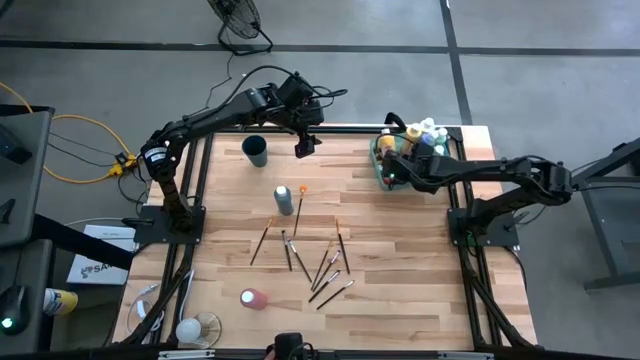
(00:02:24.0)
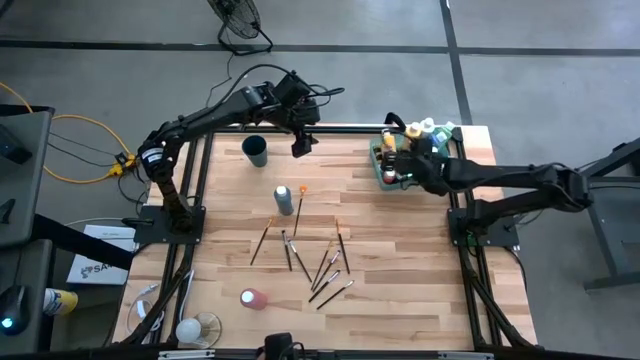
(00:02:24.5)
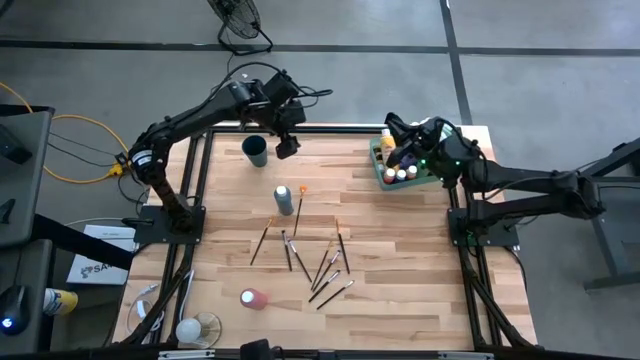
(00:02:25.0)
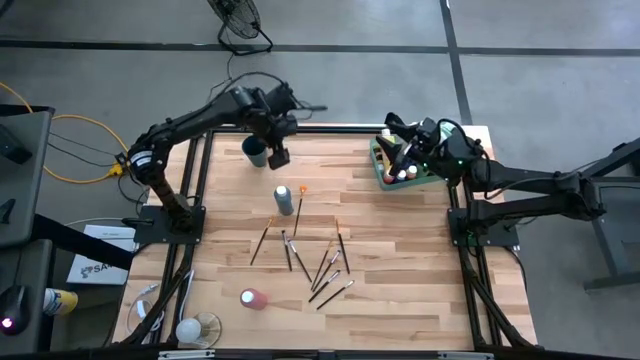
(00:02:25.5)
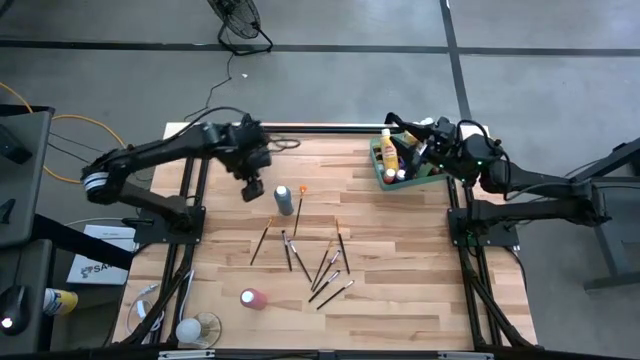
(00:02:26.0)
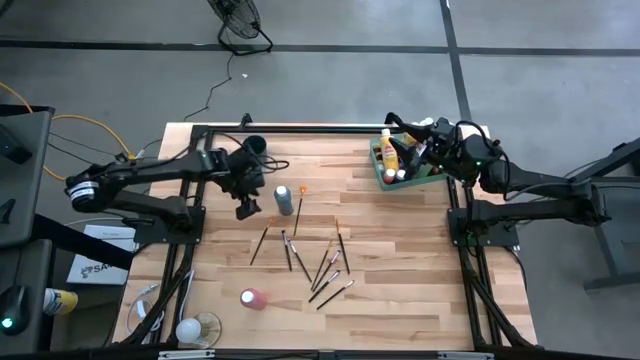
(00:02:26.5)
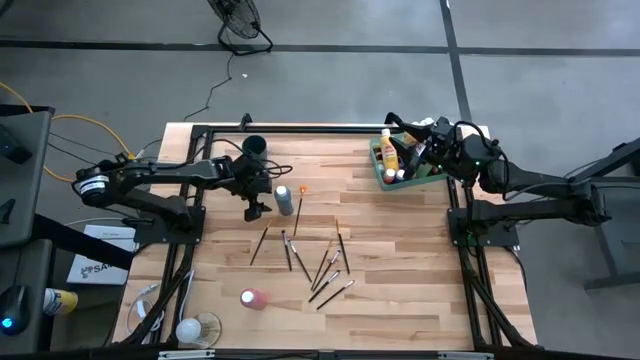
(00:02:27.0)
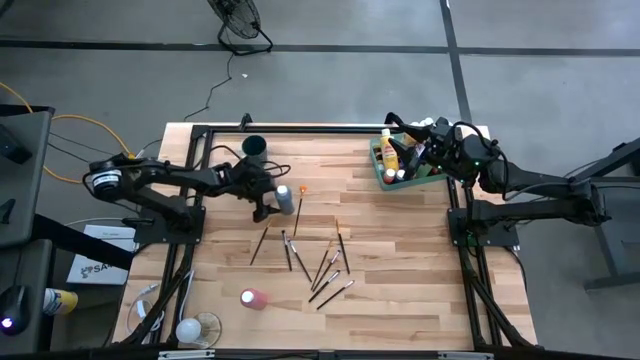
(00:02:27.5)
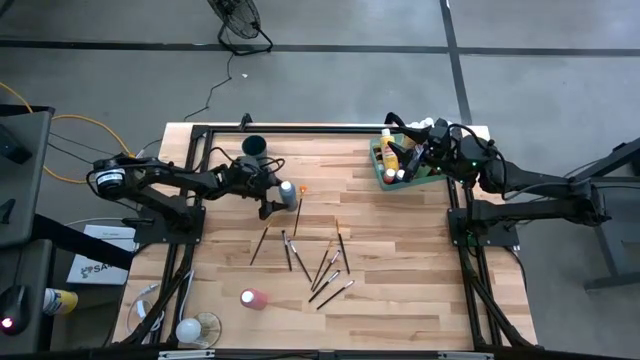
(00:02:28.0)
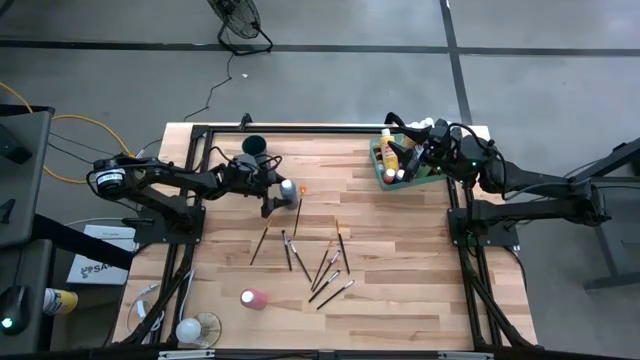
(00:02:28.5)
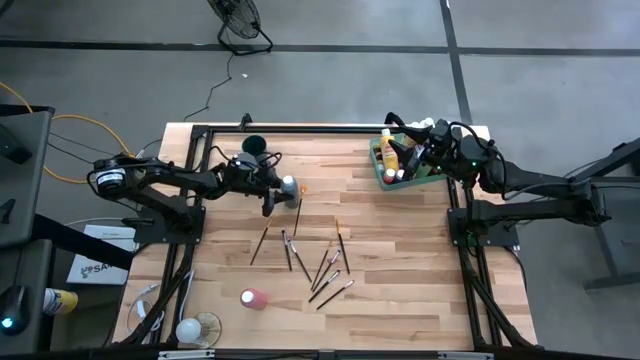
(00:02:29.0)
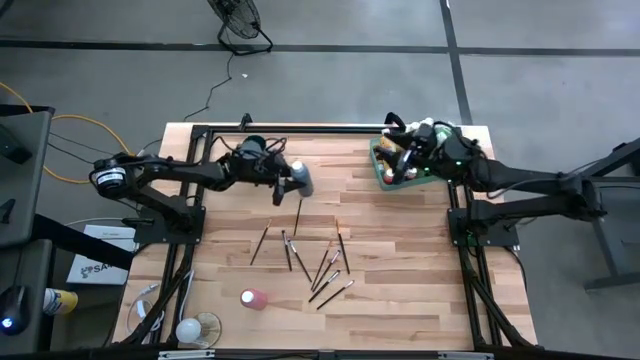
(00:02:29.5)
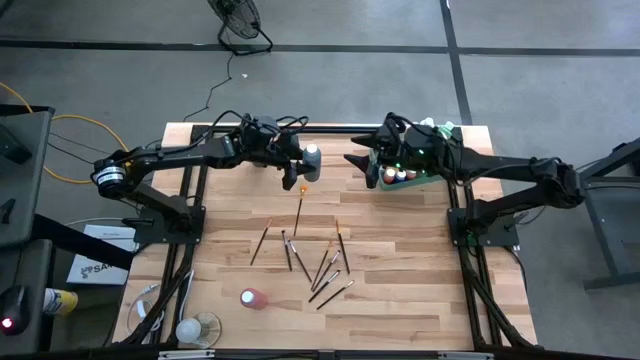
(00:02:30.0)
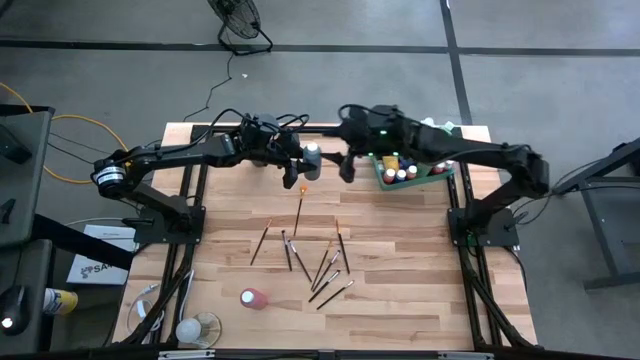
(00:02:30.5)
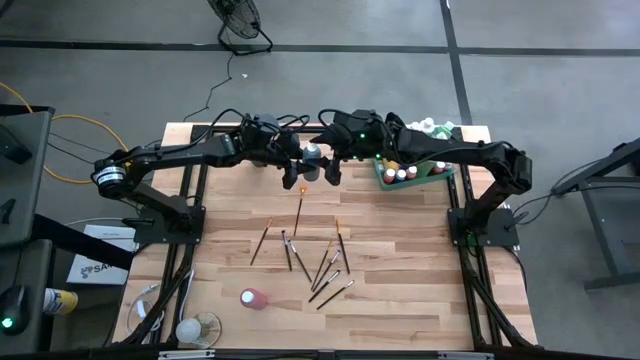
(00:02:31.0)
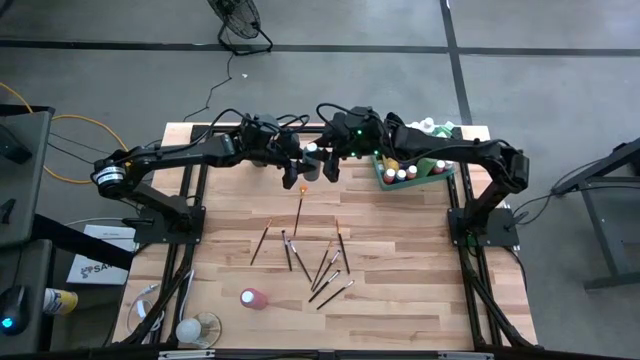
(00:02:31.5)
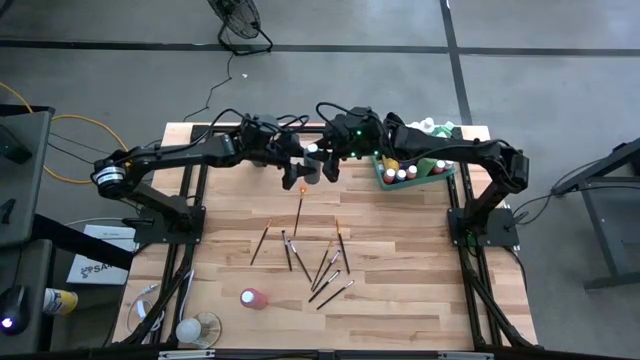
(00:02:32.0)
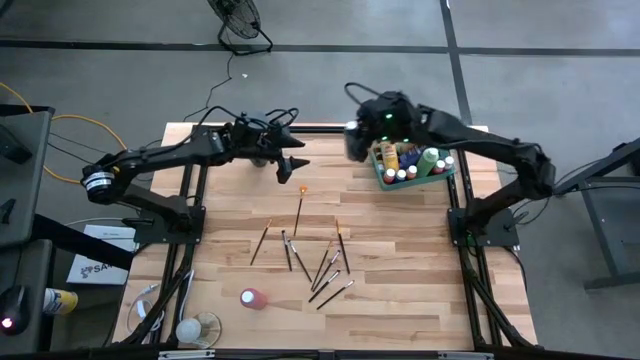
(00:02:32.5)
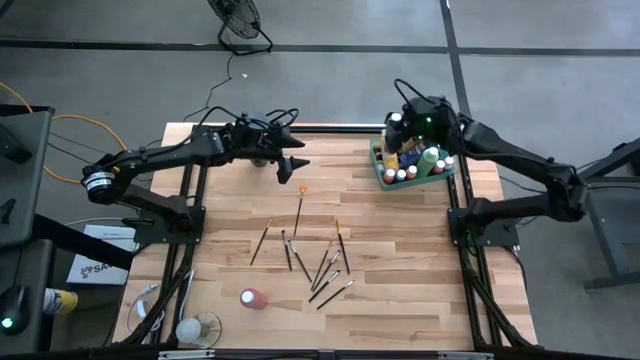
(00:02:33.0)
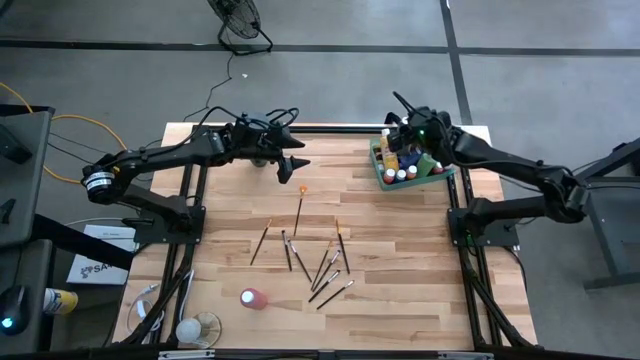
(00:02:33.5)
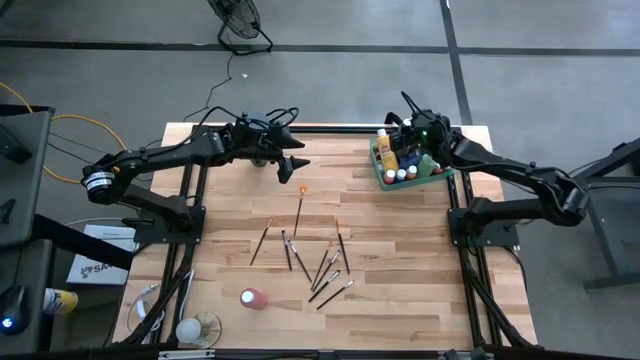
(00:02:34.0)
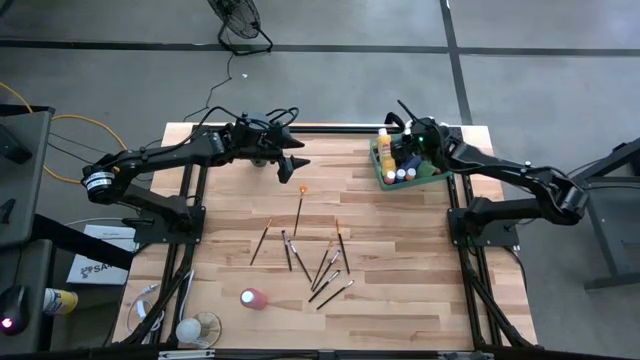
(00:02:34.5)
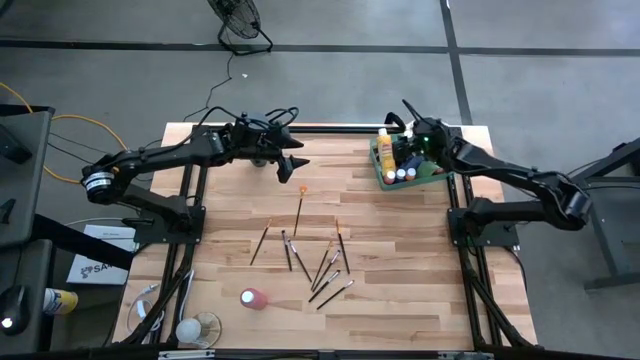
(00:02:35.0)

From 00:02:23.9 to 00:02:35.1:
Task: Pick & Place Paint Supplies
Put the big dark green paint bottle into the green bin

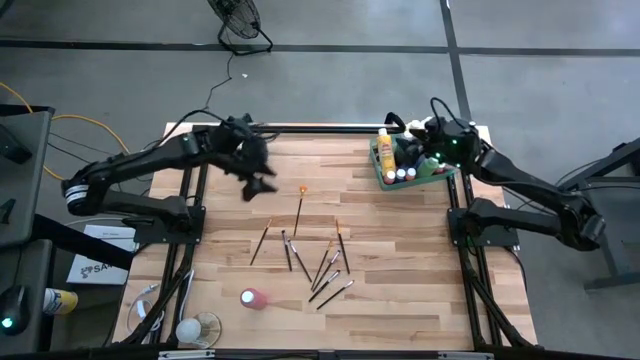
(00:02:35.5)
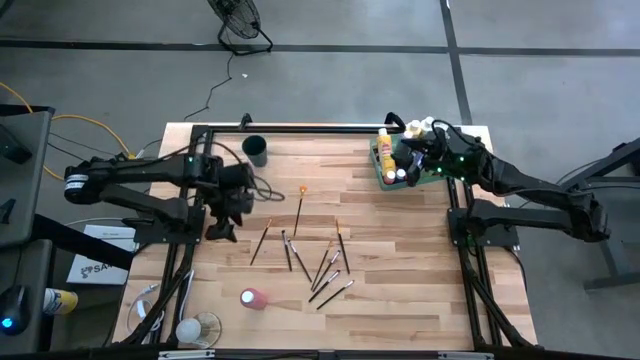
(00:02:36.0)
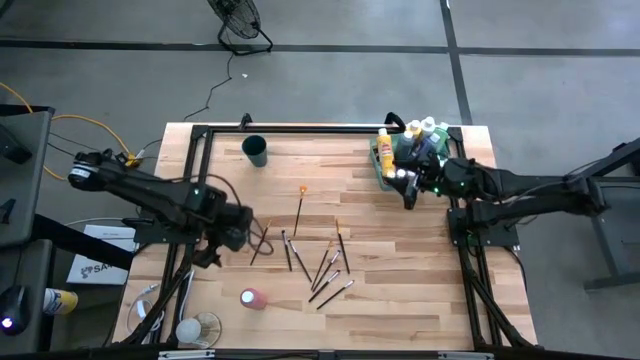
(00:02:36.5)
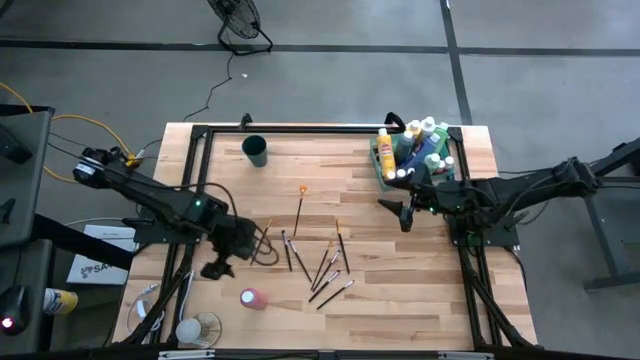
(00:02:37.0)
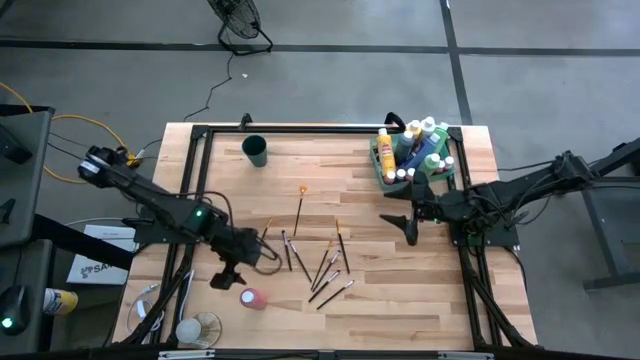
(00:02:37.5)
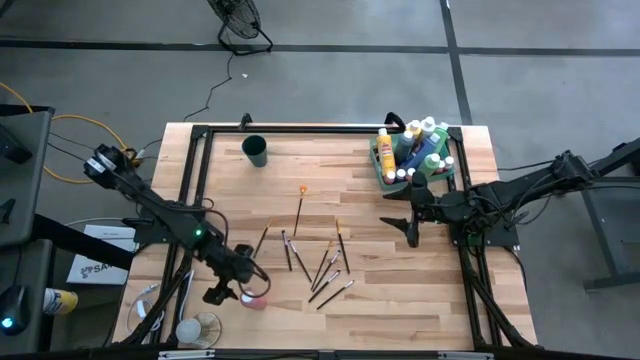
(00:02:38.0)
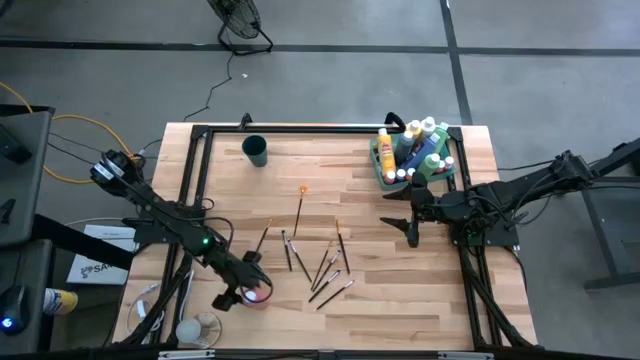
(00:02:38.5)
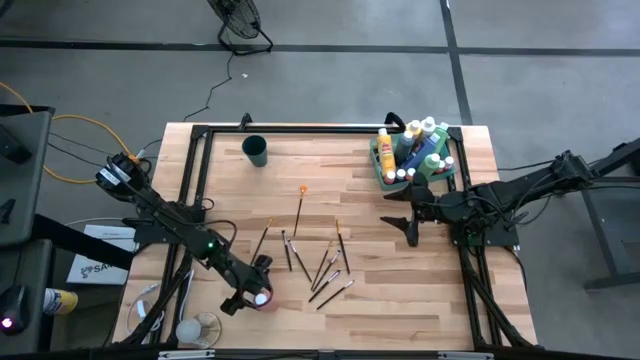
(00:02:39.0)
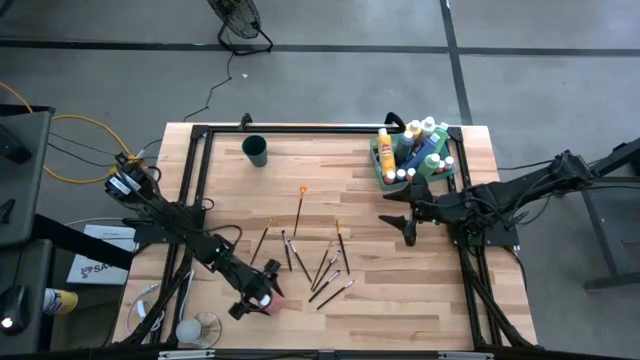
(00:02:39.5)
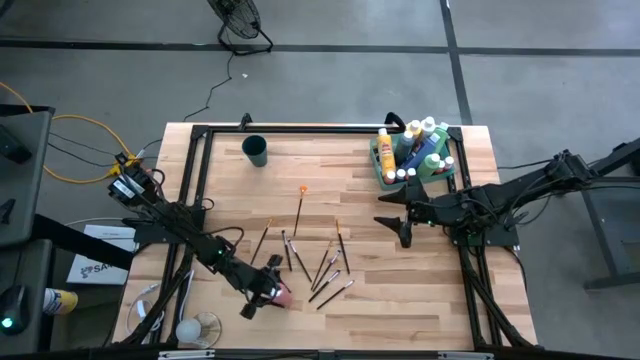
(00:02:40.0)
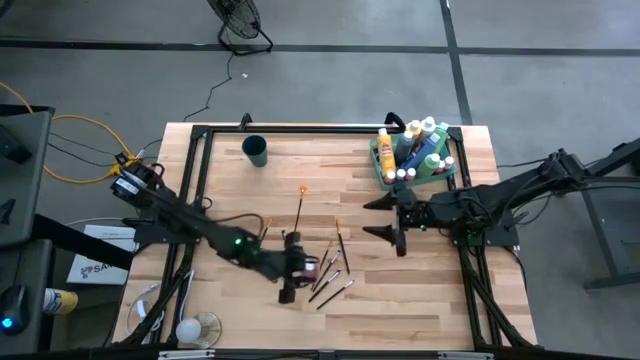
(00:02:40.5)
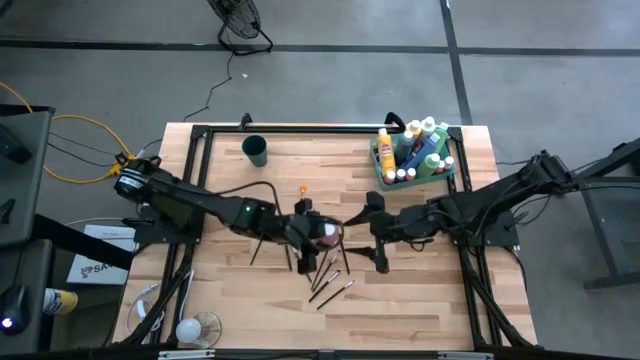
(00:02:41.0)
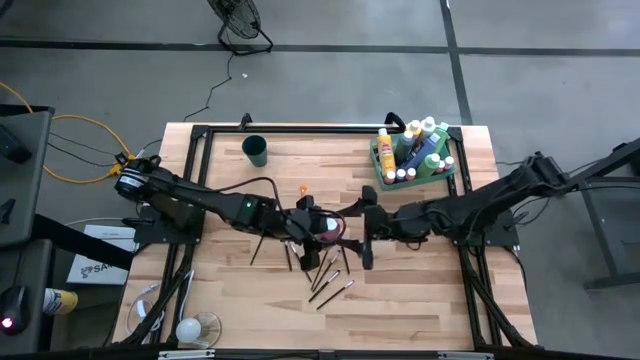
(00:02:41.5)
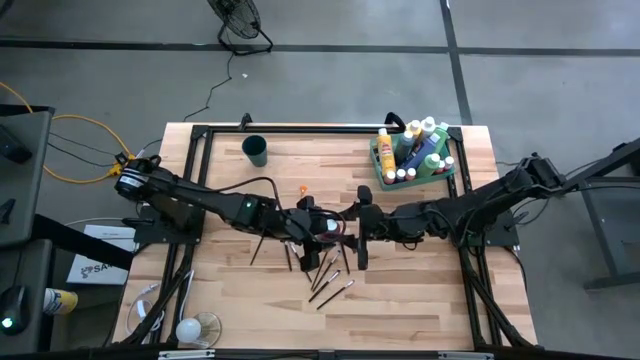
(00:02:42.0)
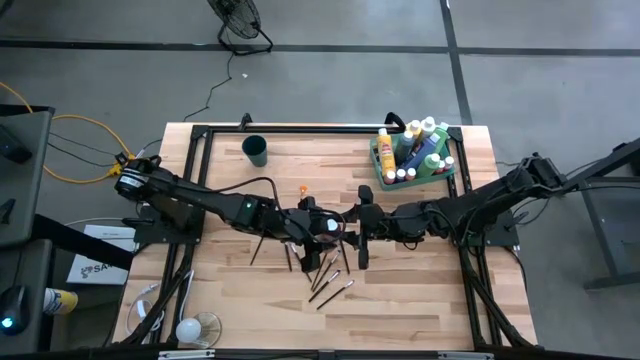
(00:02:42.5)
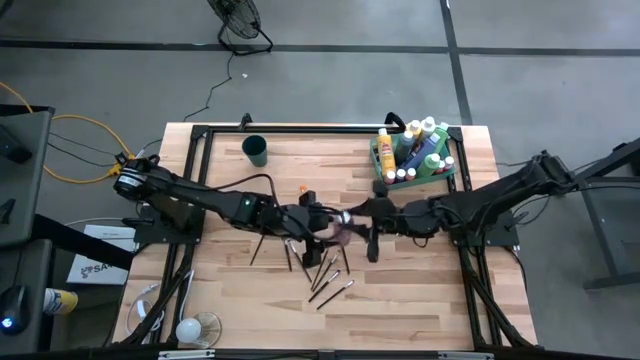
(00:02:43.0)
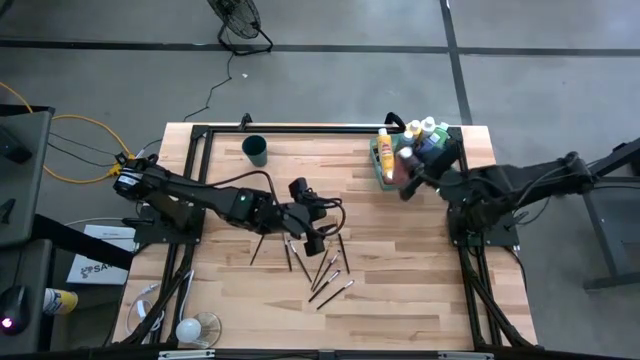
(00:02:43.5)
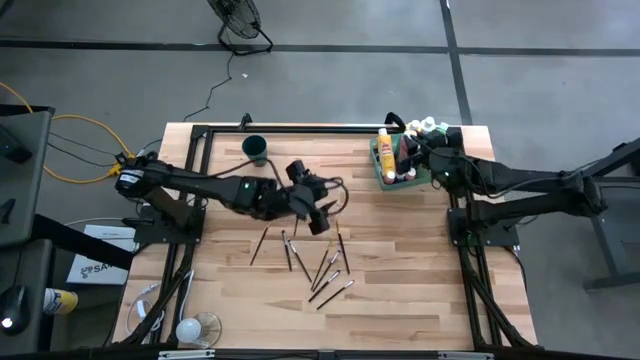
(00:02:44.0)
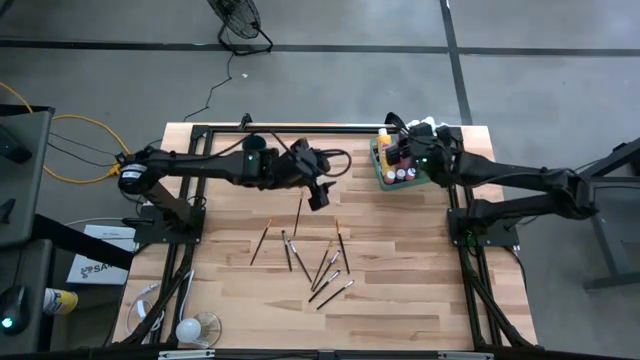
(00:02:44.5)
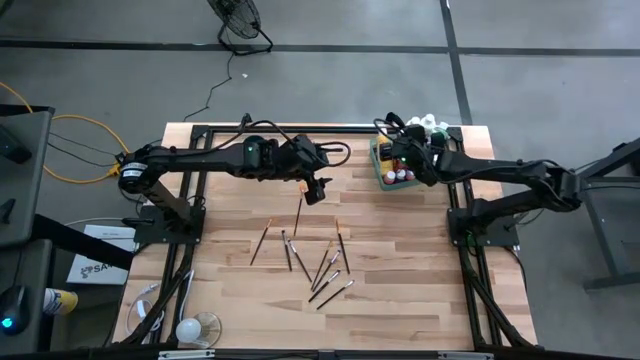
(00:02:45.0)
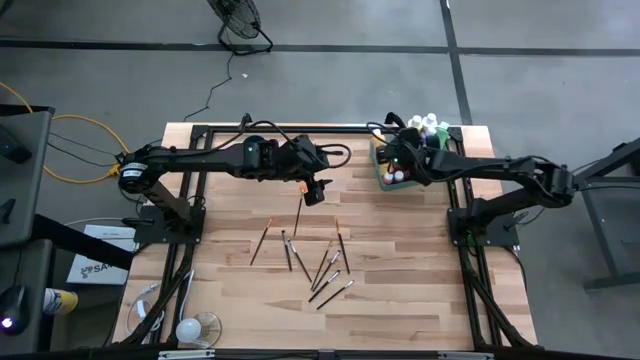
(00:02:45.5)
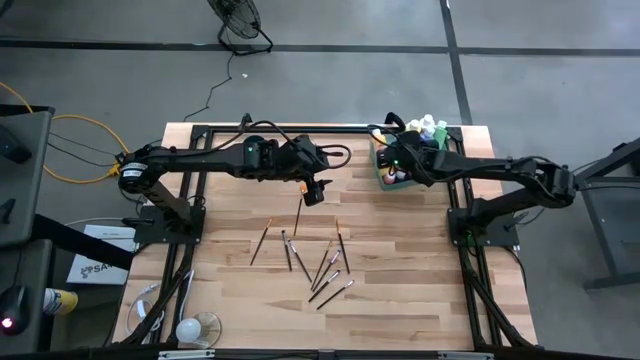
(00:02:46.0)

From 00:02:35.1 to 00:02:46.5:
Put the big pink paint bottle into the green bin
